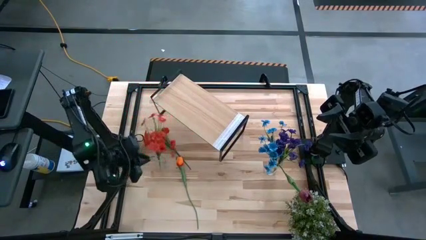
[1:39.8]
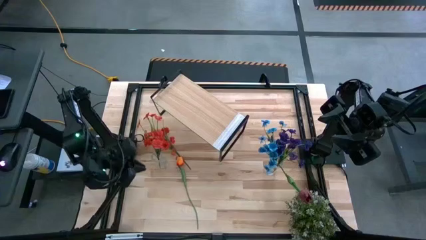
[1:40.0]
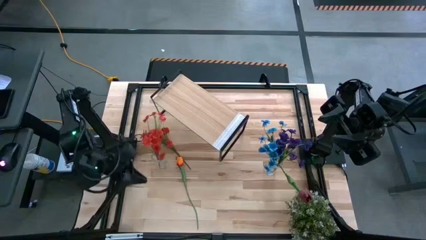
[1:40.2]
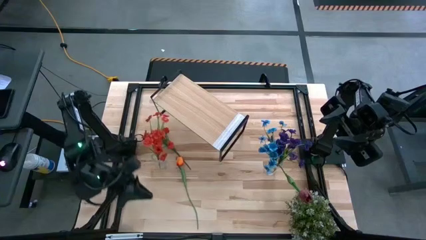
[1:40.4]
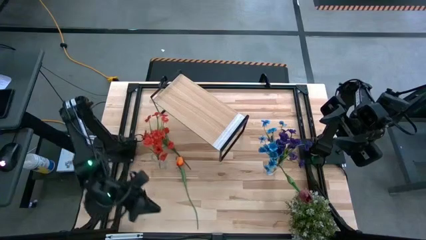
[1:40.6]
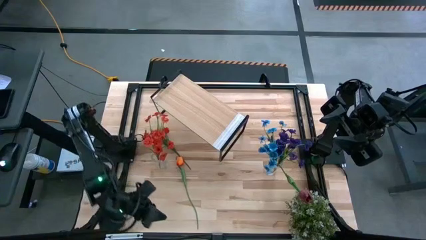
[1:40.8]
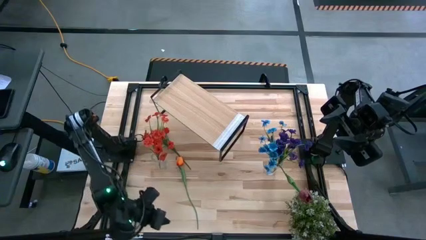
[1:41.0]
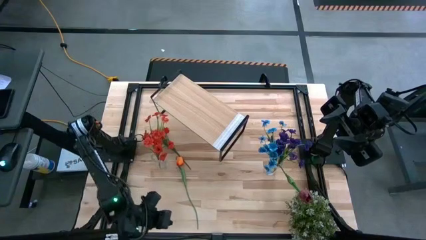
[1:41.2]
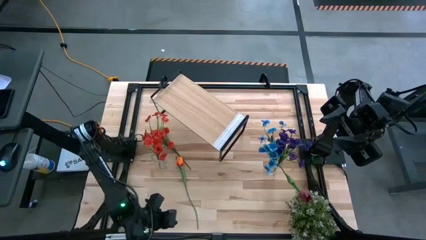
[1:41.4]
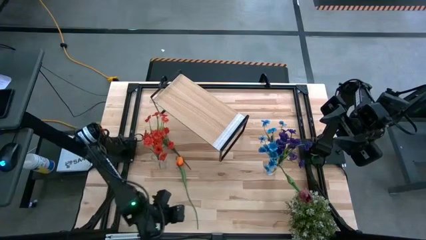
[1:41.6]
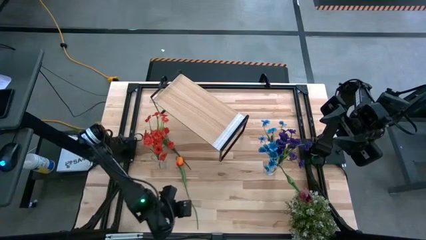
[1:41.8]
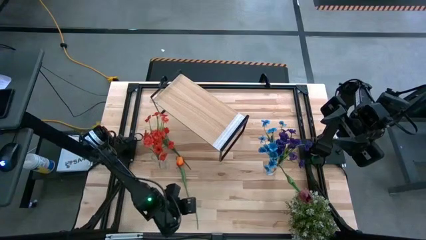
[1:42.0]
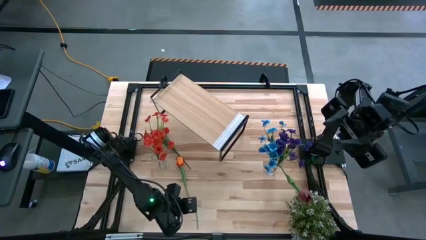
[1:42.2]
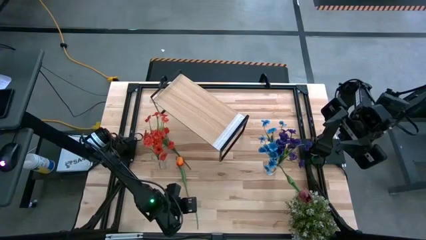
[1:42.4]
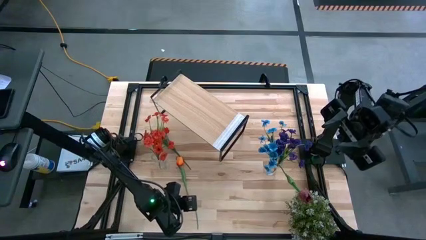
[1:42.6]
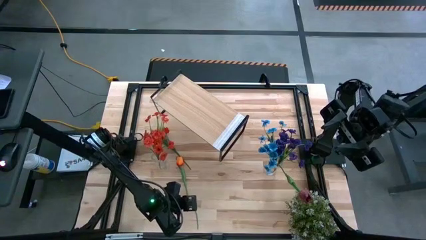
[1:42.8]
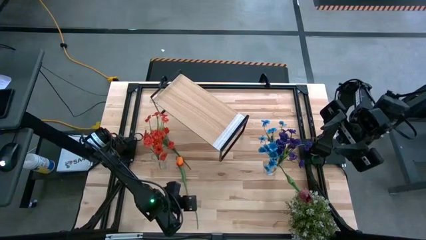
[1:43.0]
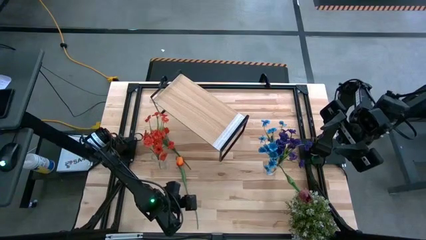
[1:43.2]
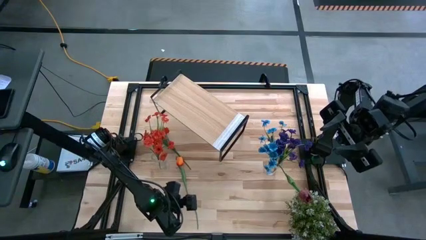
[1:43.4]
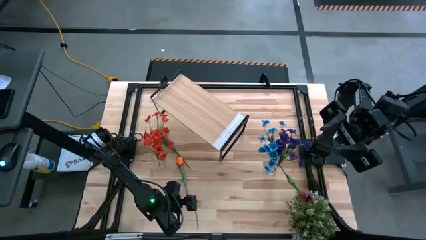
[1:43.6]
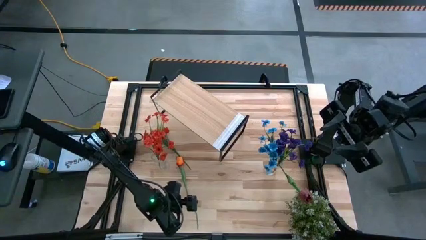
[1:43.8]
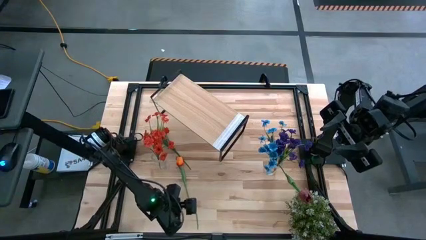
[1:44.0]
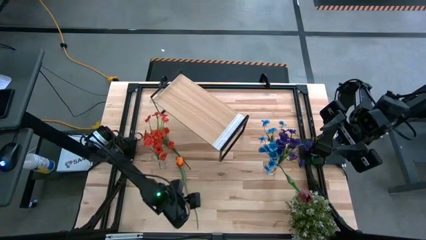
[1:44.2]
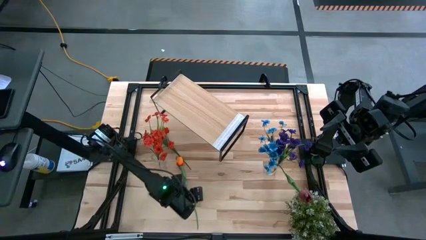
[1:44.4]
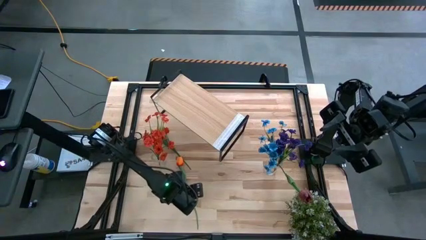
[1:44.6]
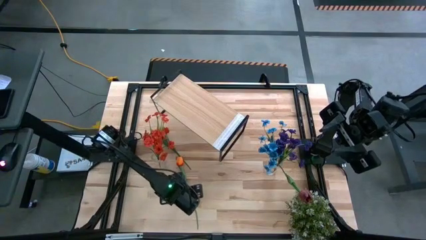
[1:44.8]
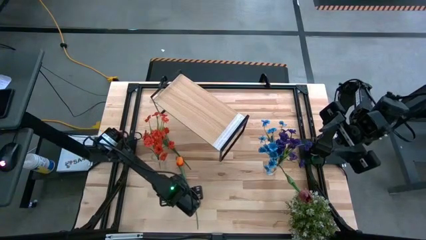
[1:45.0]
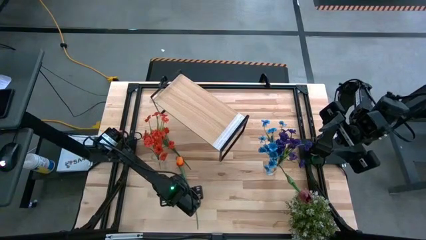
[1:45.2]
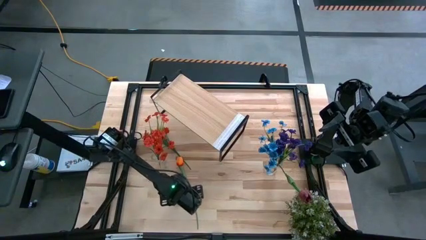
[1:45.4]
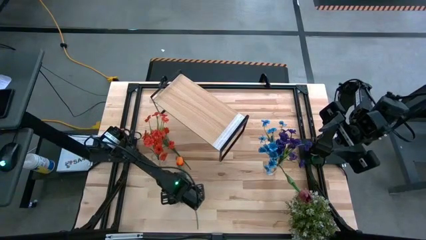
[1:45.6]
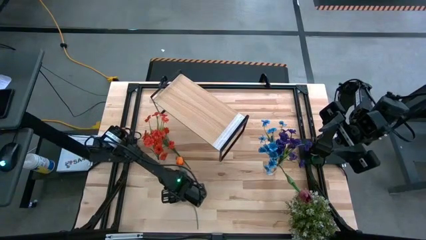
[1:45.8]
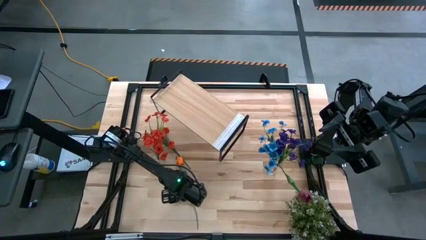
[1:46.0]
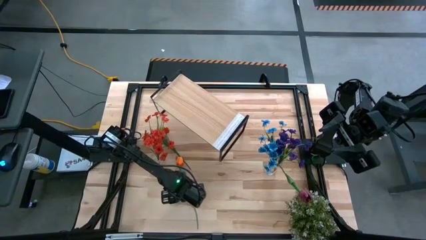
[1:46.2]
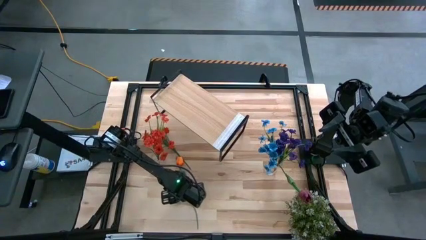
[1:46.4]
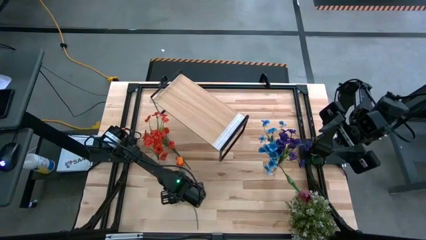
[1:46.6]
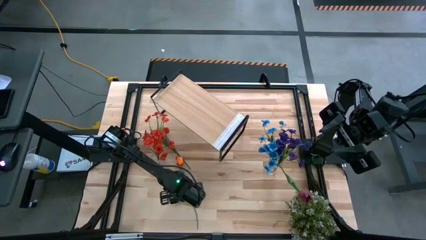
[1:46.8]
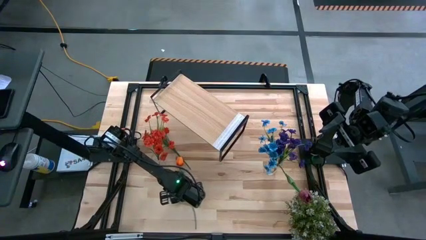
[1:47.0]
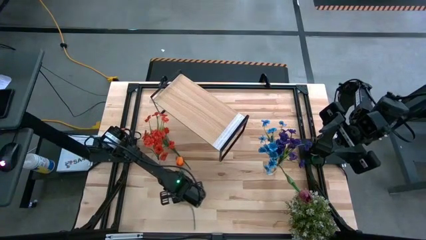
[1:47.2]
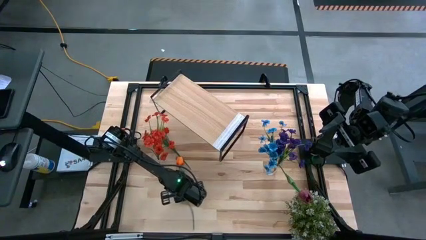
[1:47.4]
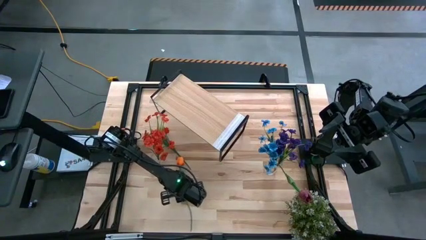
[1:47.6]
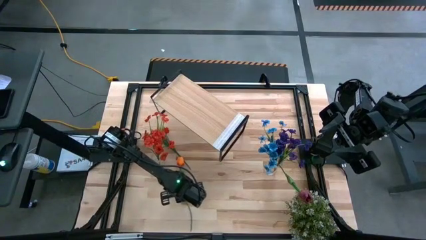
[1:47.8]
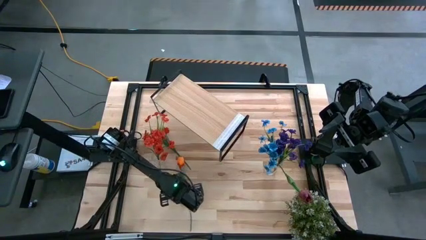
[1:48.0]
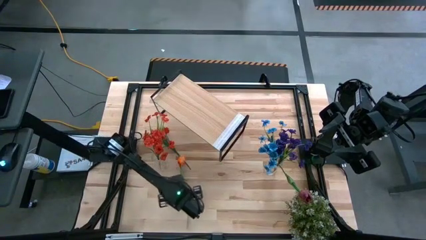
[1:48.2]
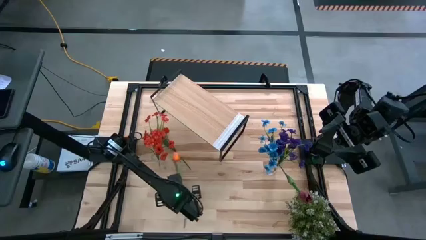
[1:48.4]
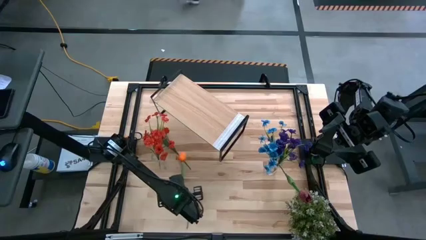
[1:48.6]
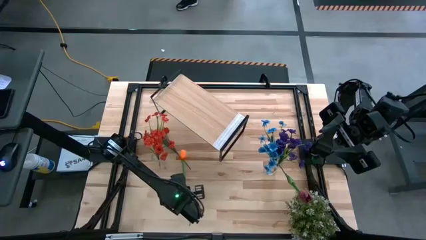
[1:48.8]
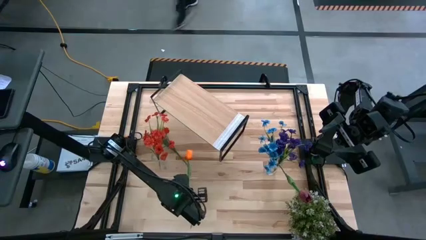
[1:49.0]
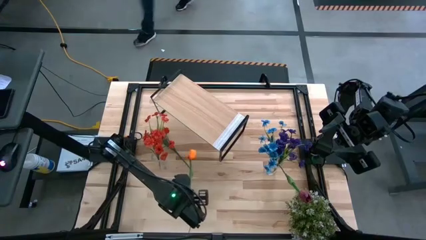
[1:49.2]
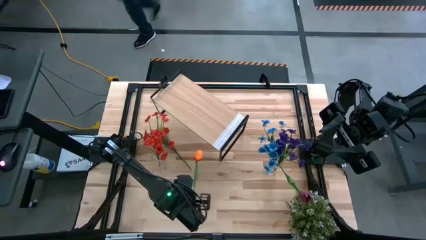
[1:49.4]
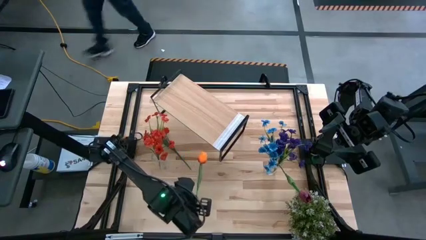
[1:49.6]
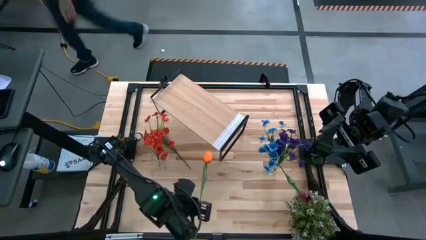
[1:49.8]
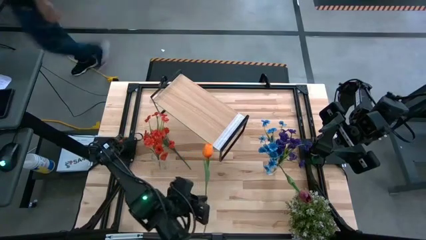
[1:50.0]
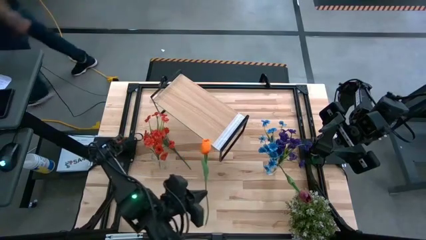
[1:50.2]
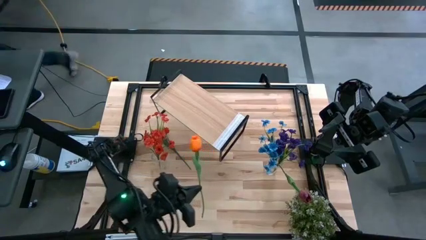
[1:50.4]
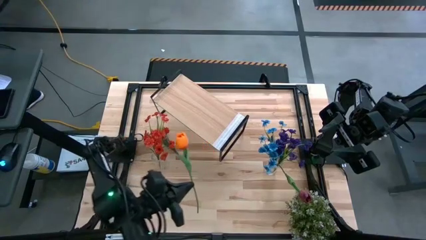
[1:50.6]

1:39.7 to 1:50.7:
Task: Pick and place flowers into a vace then onto a shelf
Put the orange tulip into the left transparent vase

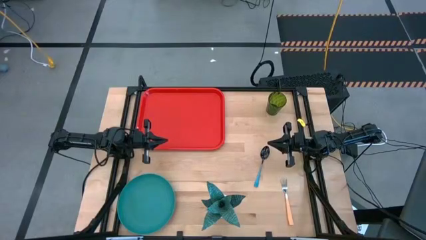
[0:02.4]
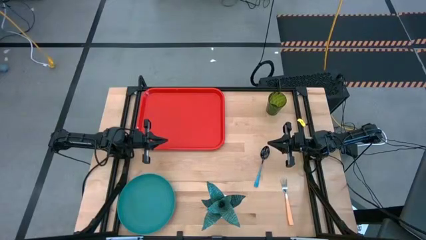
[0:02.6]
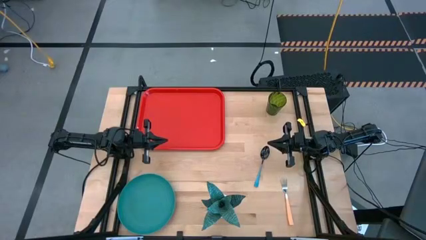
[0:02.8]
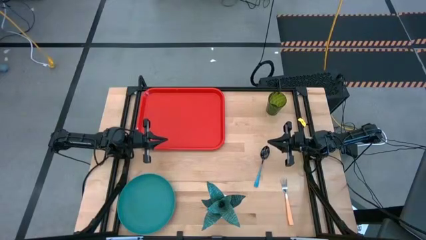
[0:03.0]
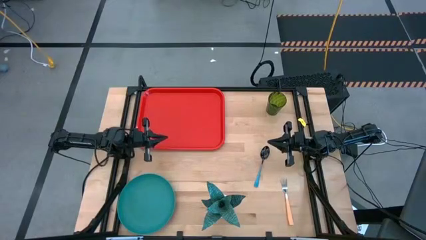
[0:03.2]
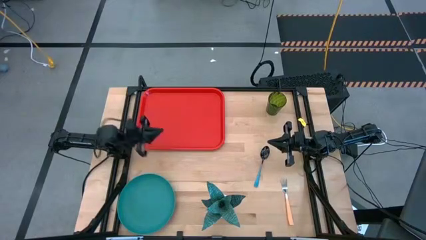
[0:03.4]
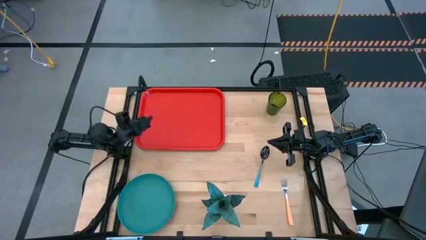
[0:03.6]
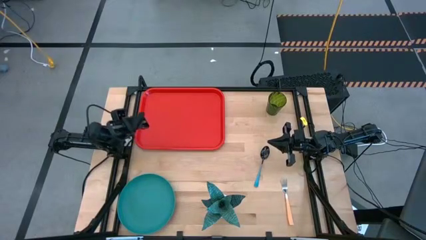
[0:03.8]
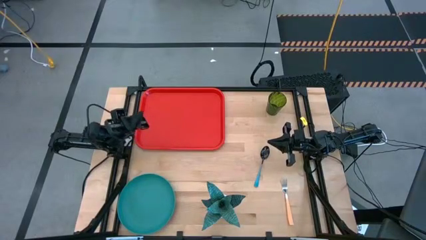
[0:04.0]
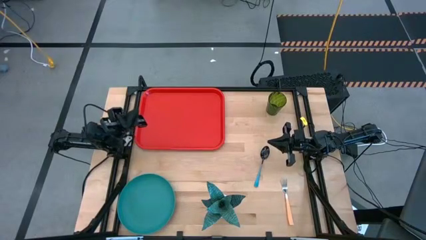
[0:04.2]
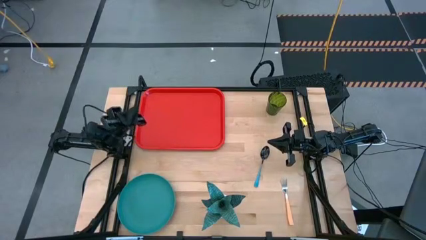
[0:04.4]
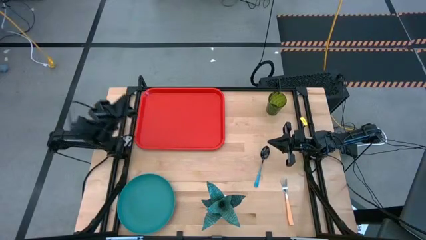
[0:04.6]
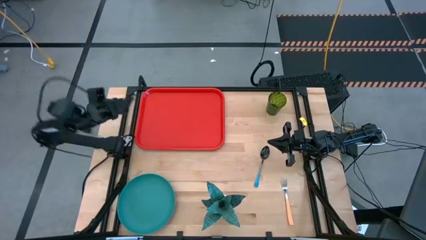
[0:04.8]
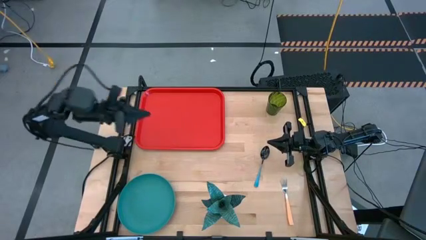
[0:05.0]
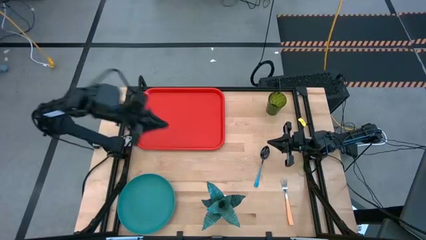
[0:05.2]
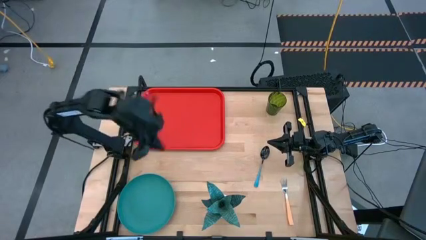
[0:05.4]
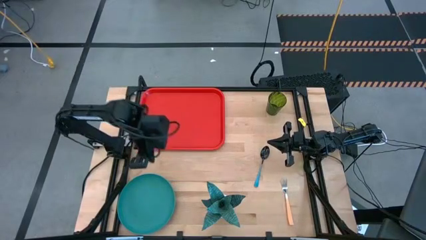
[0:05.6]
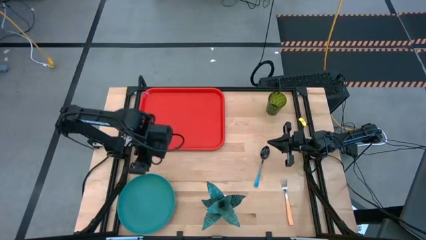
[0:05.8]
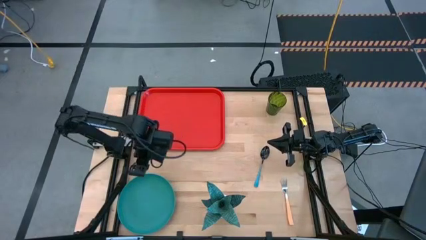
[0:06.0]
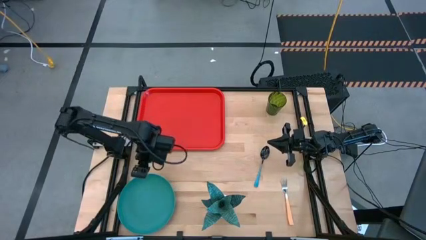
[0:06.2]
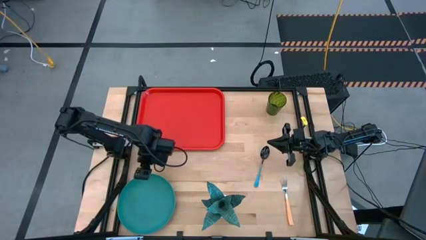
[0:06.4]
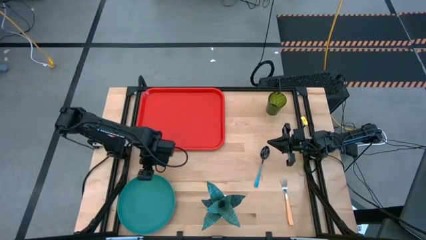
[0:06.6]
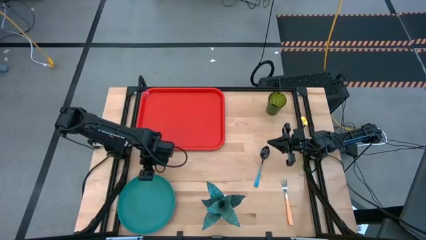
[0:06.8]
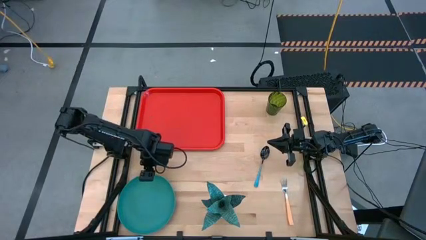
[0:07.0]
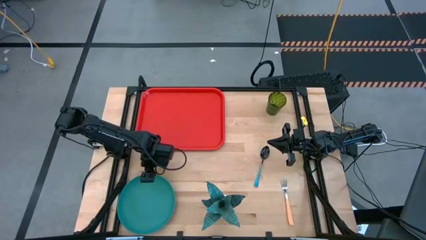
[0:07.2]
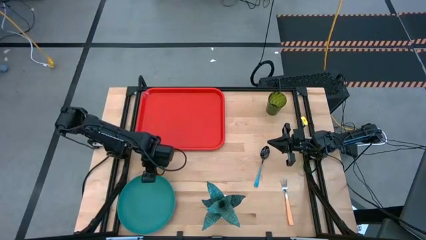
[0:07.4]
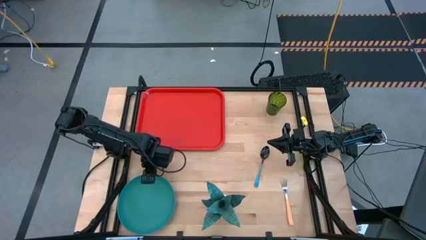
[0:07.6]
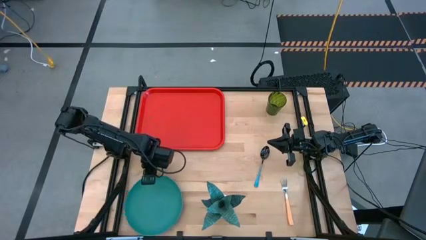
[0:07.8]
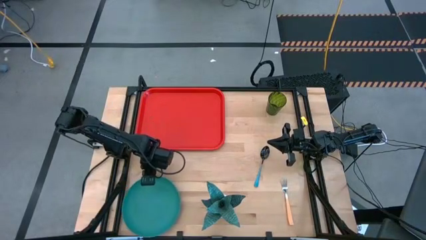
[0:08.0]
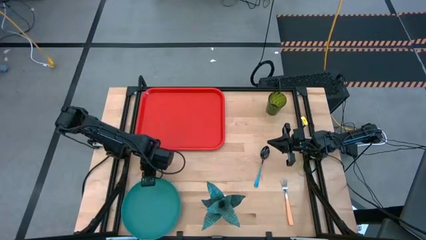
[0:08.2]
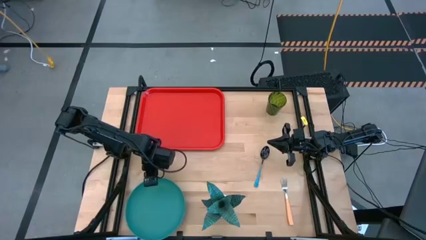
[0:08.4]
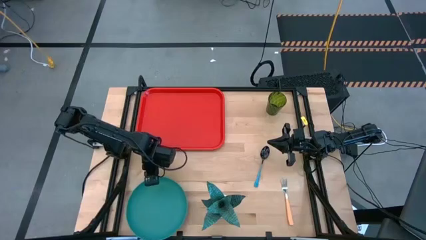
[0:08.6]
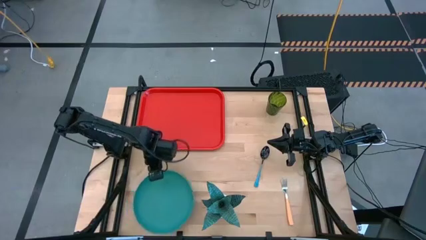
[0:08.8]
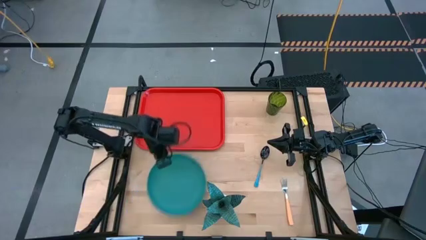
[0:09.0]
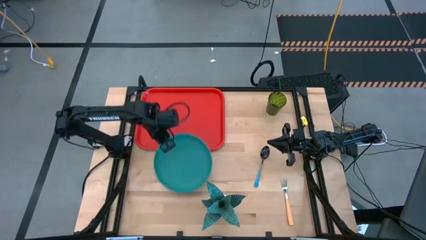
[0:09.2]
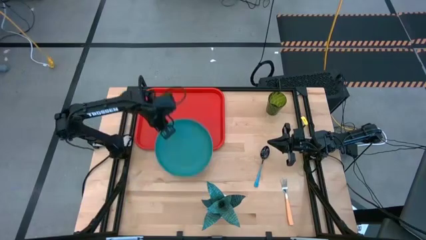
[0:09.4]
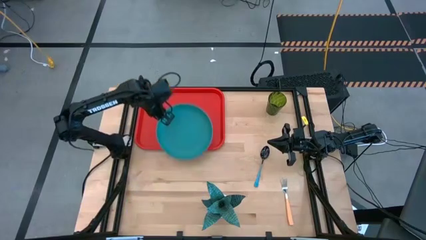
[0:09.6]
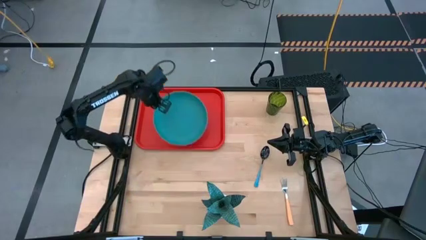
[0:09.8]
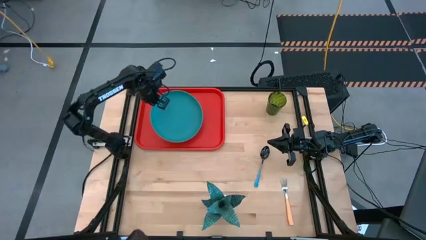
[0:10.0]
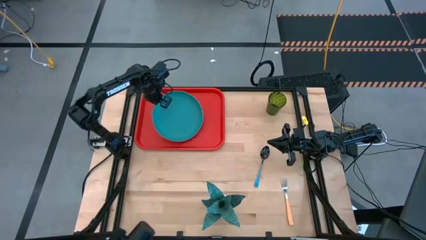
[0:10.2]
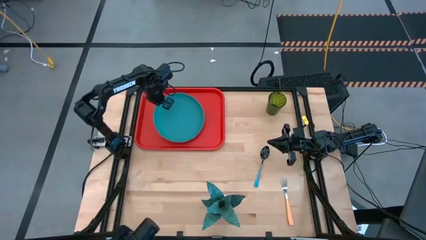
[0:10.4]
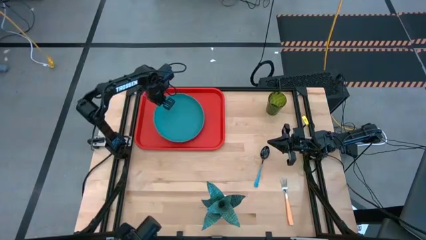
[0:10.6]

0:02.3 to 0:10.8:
Task: Pick and place plate/cup/fork/spoon on tray
Put the green plate on the orange tray
